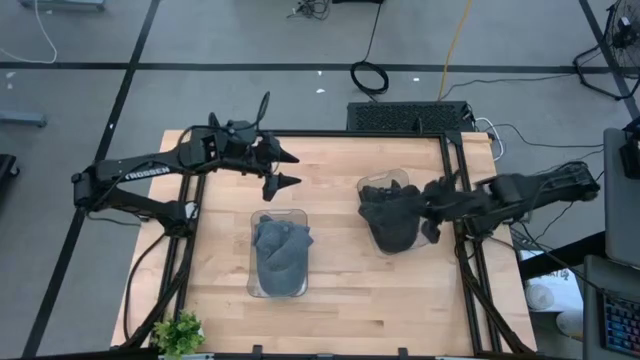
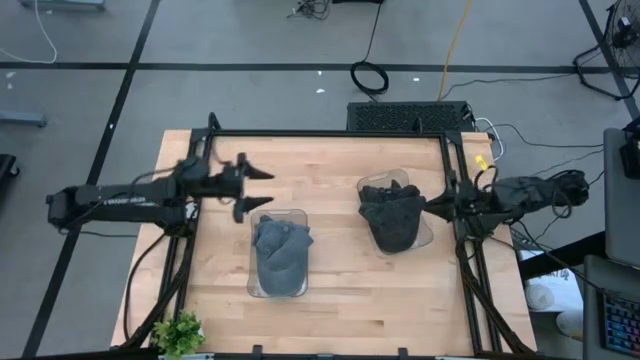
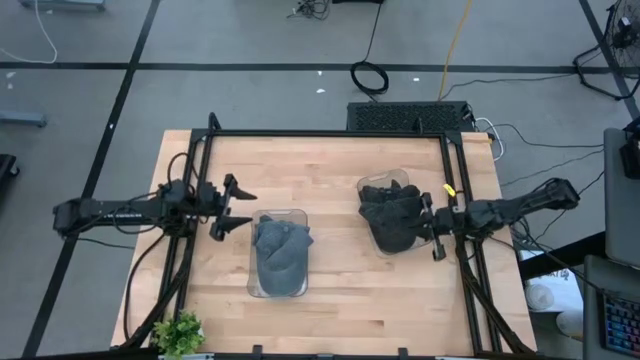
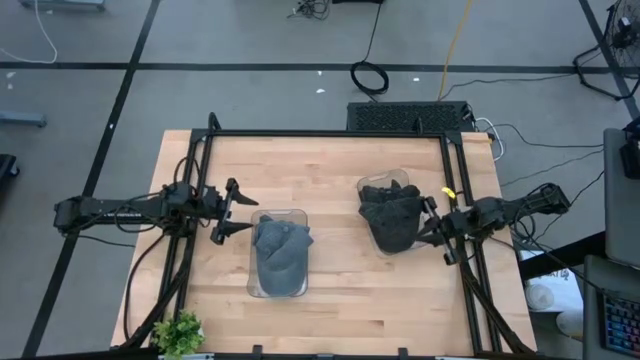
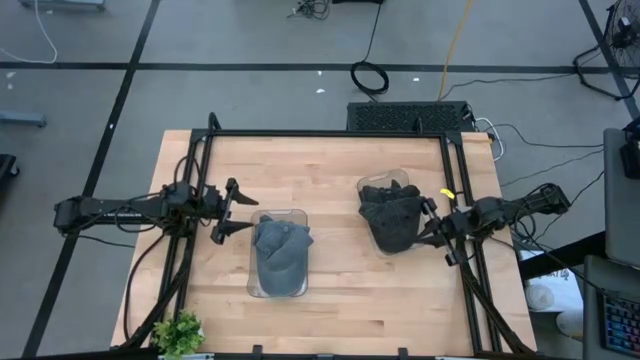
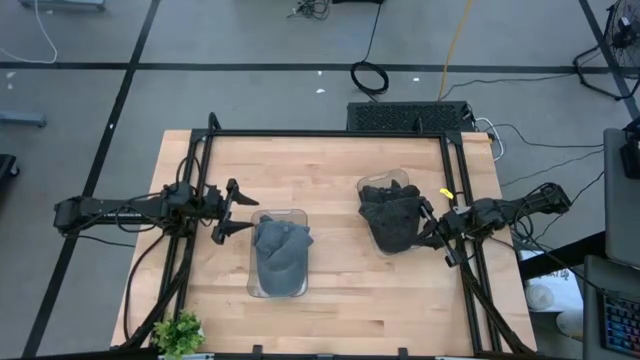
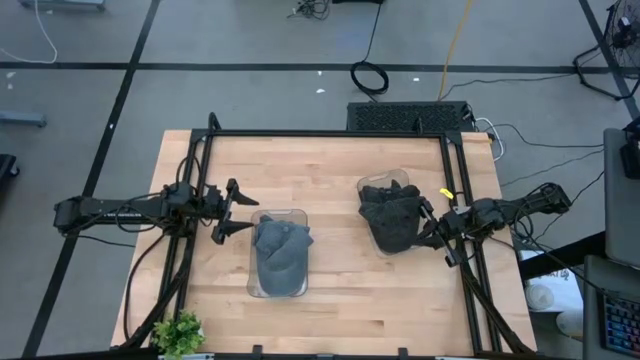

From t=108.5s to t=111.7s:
Task: Pick & Place hat
Return to Home Position

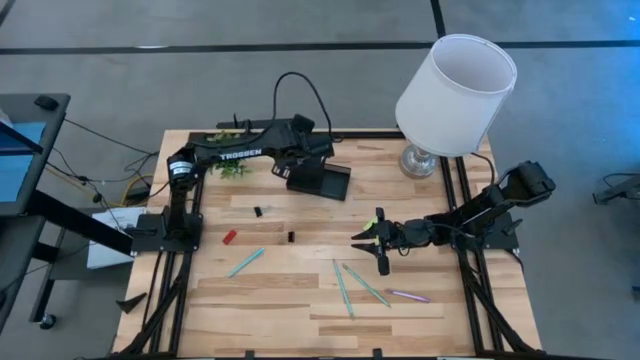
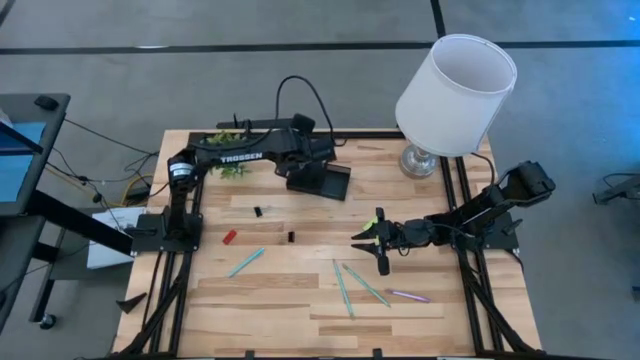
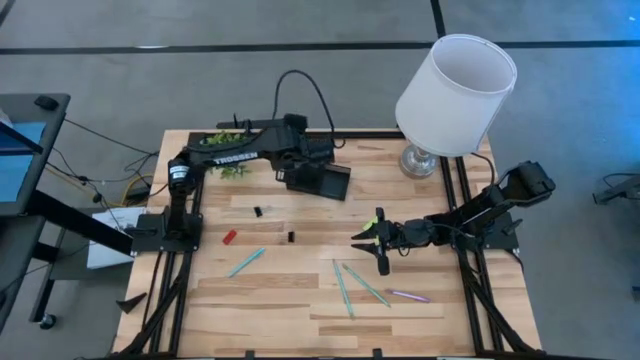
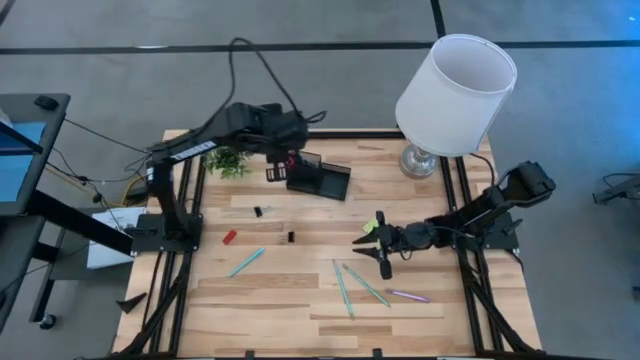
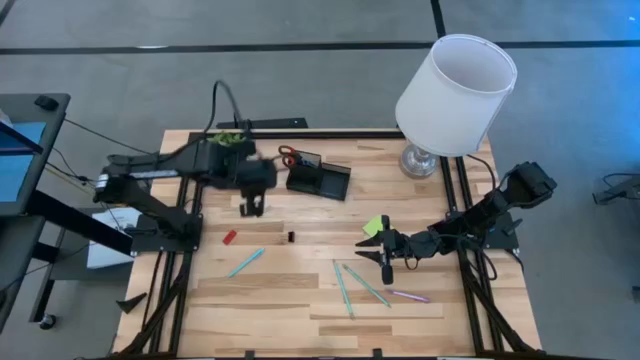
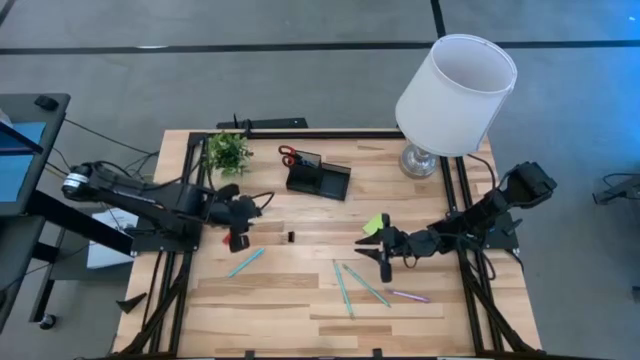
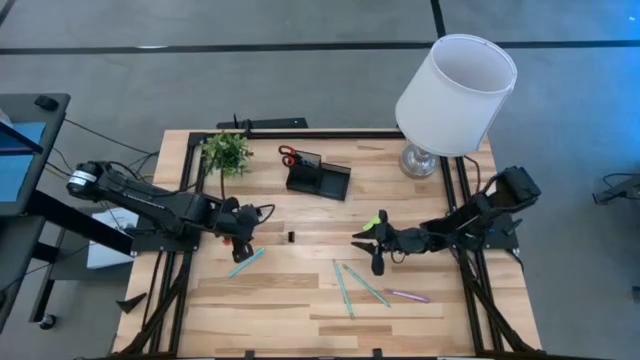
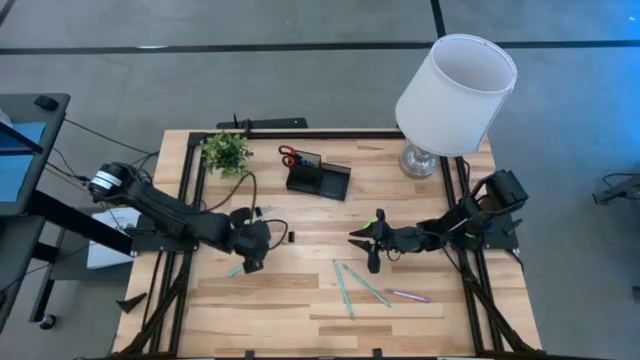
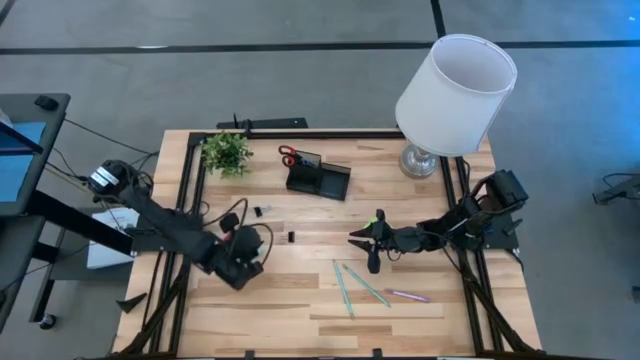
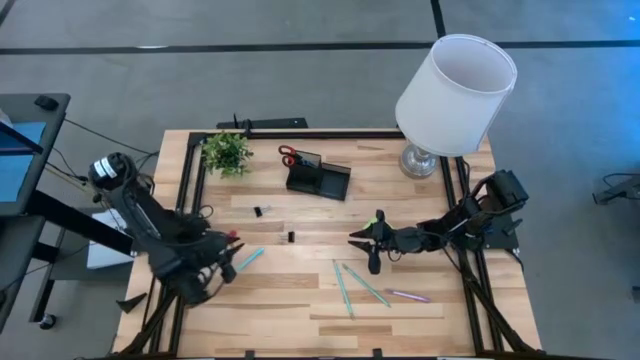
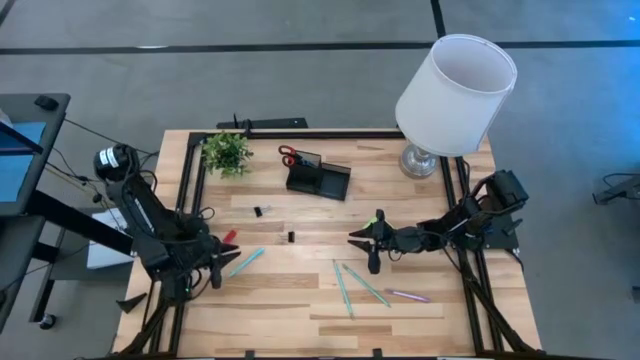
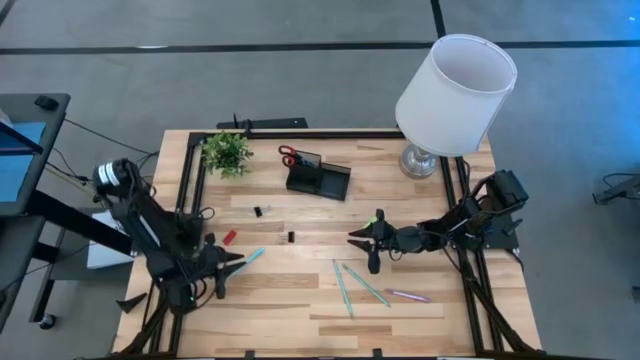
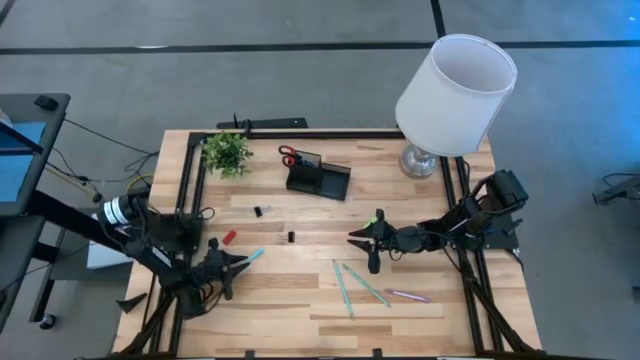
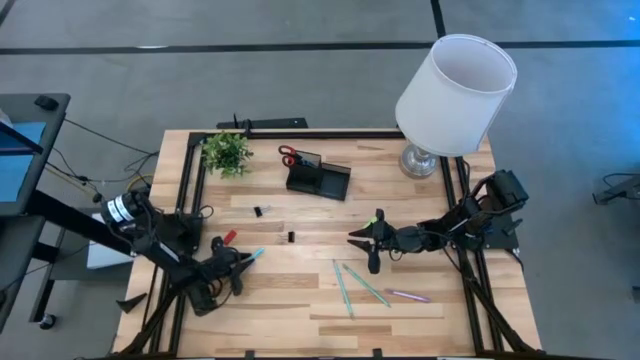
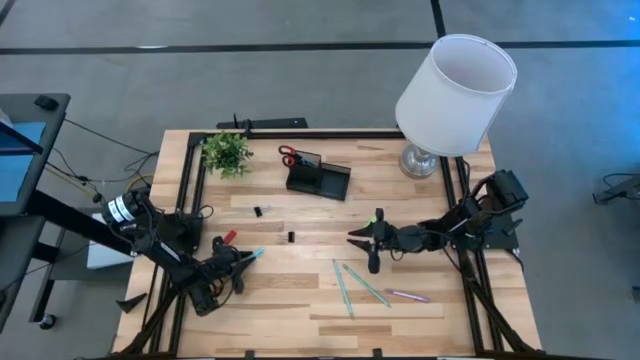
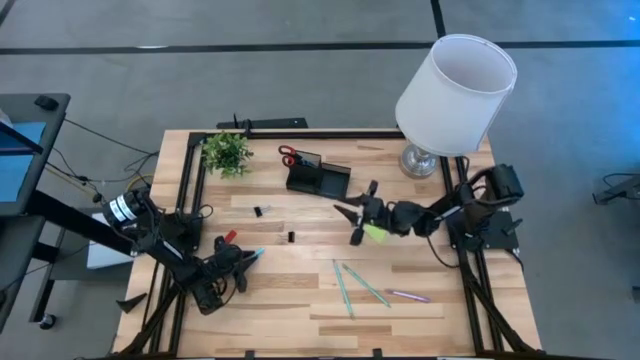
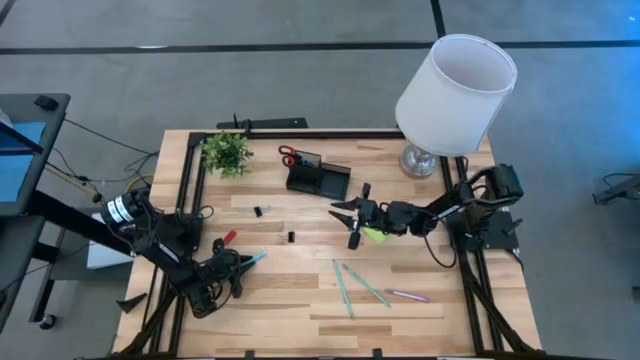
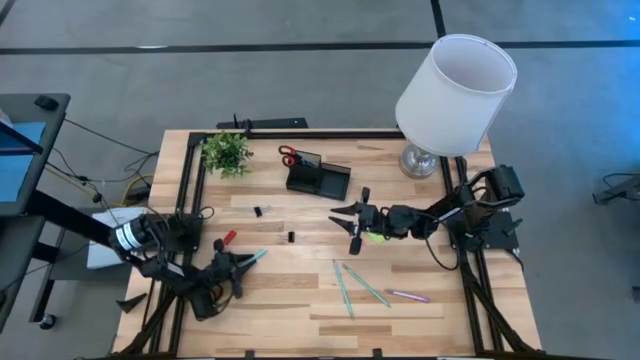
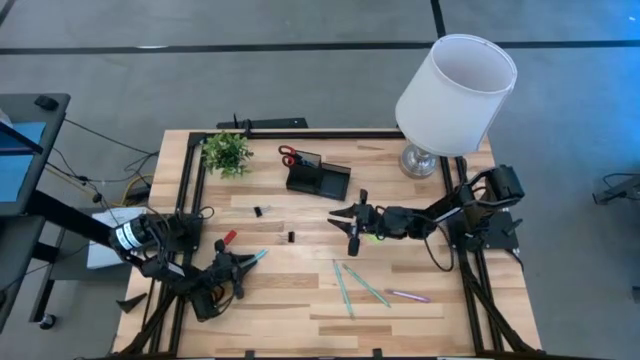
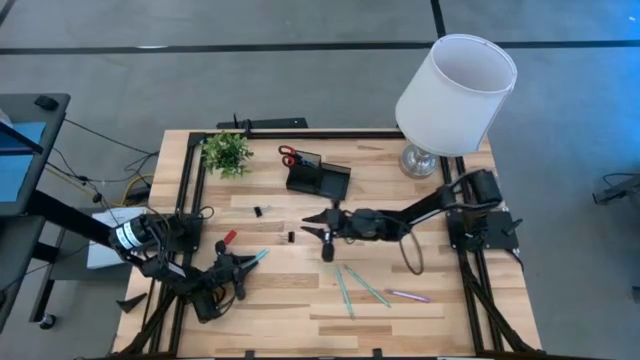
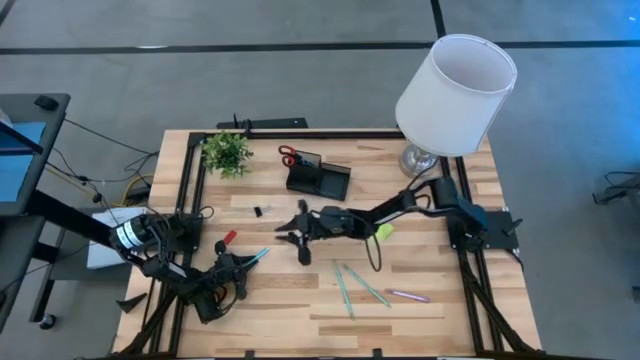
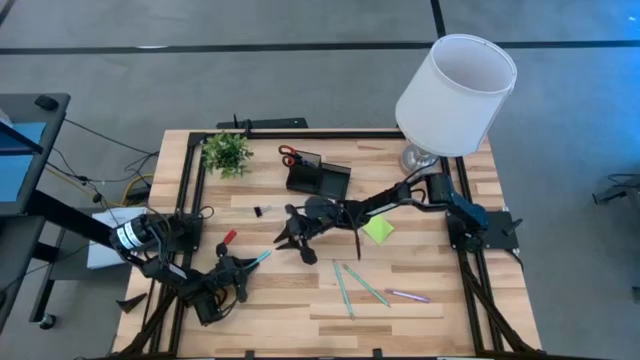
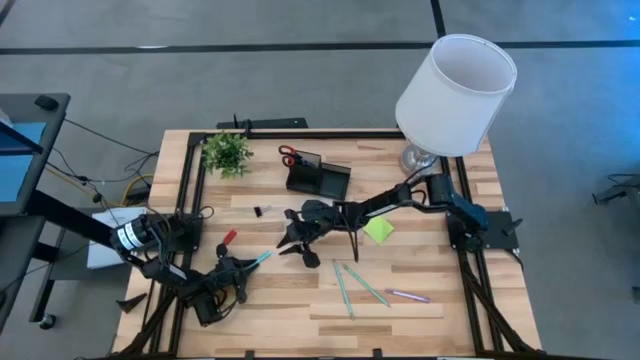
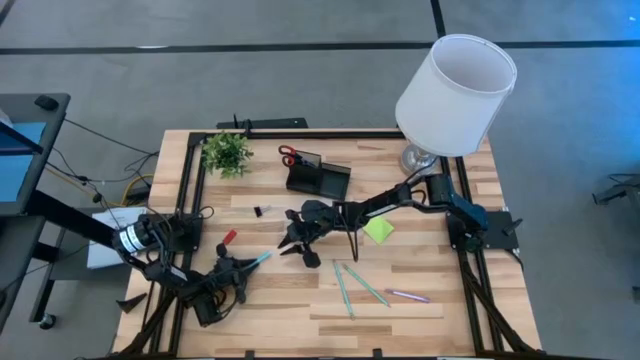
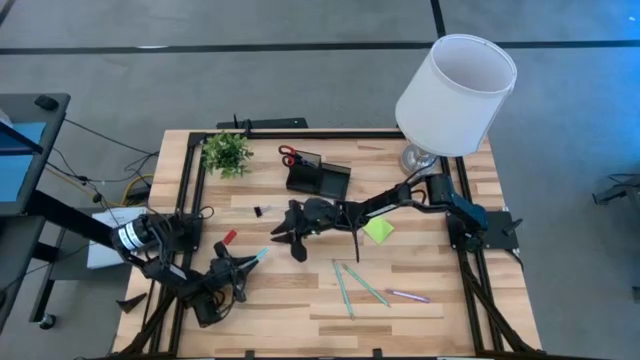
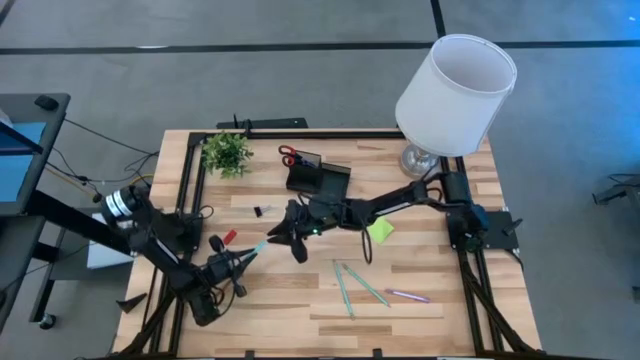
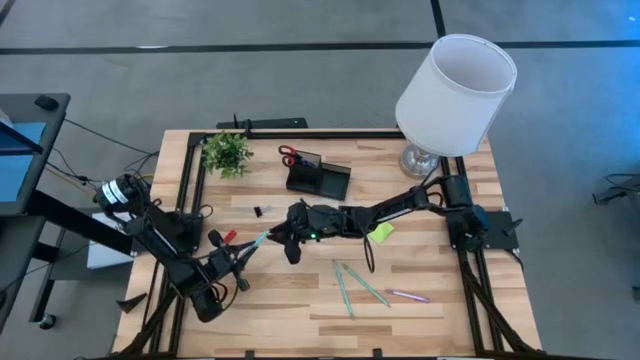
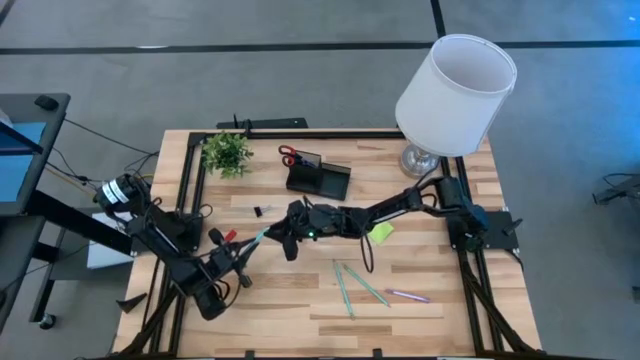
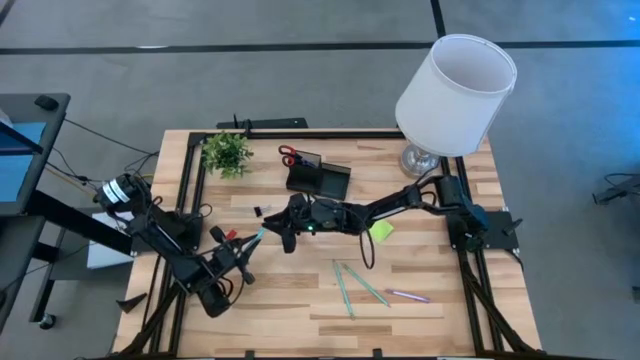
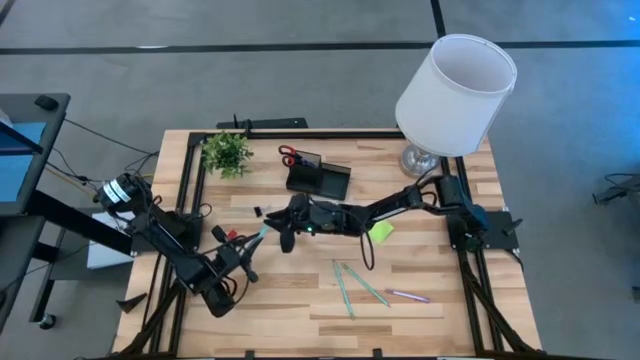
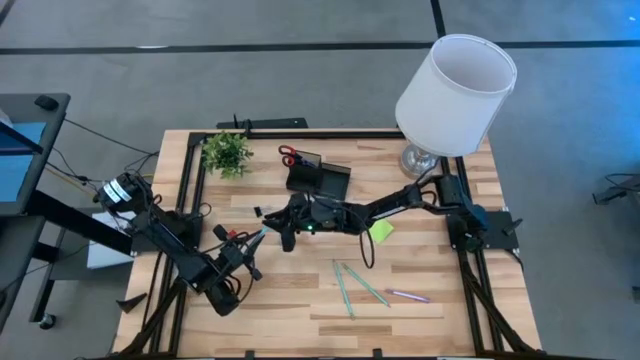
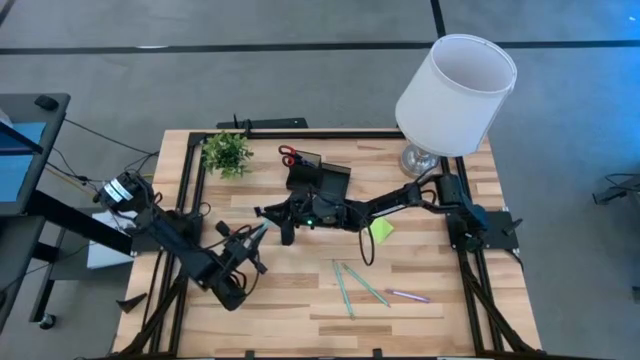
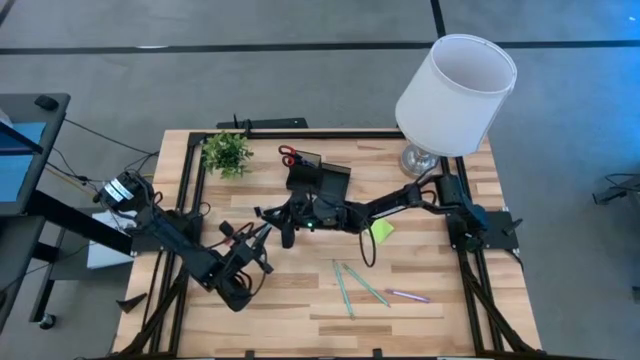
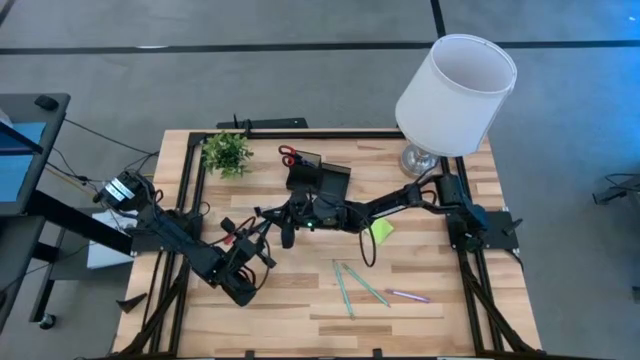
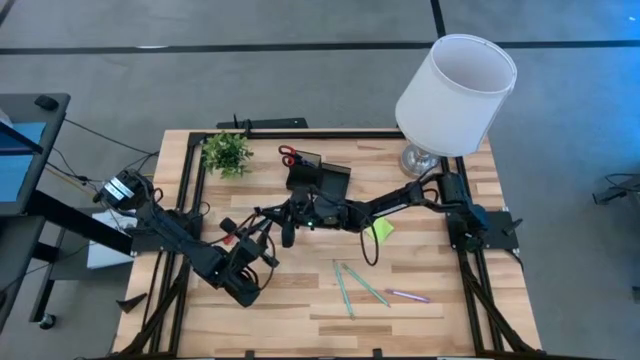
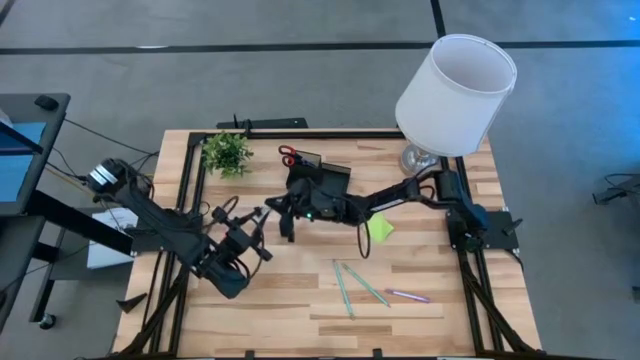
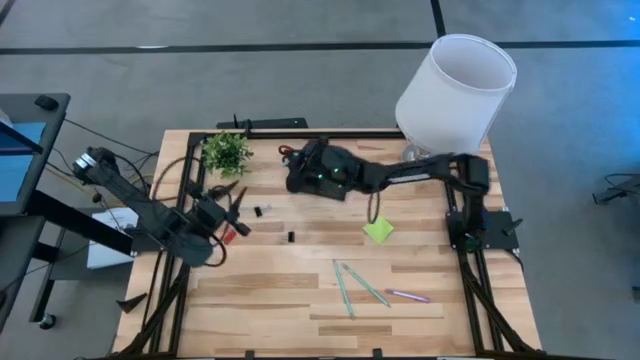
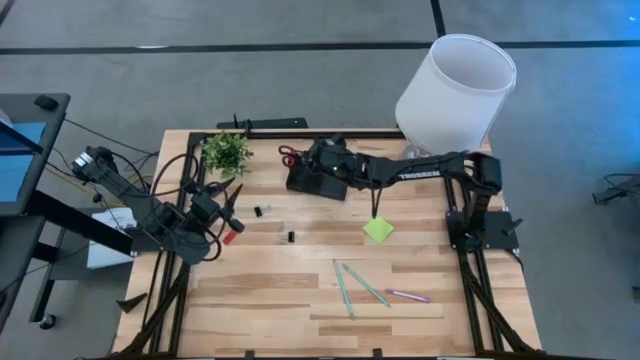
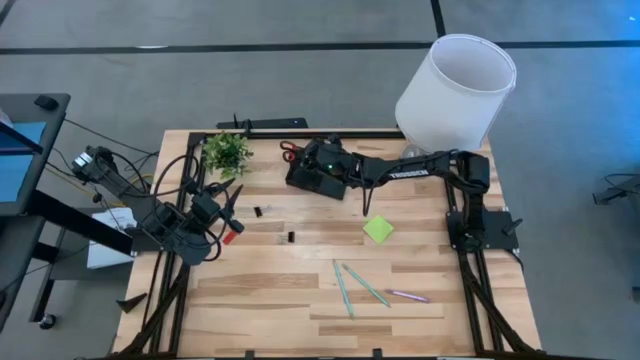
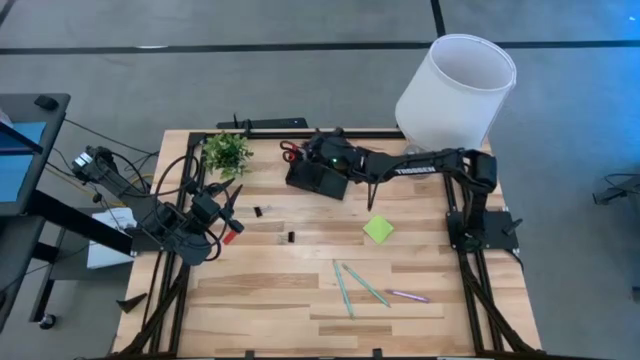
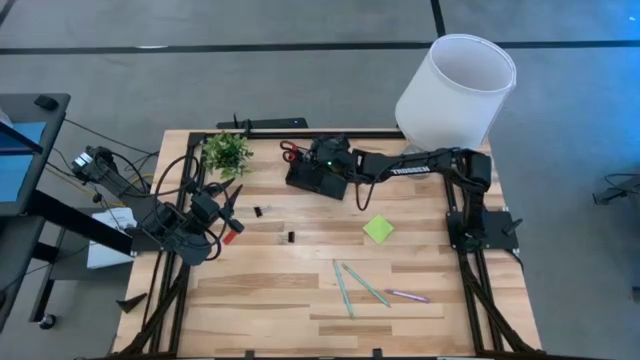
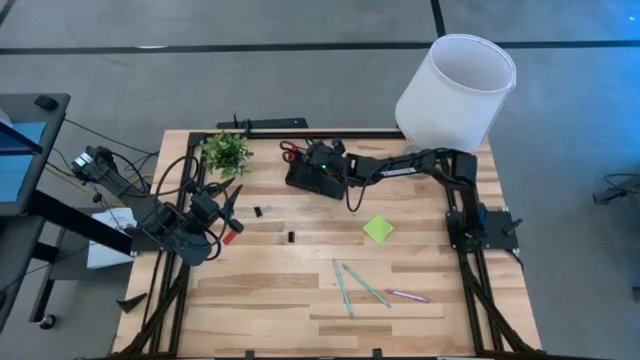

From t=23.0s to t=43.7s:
Task: Pick and place office supplies into organizer
Put the blue pen into the desk organizer
